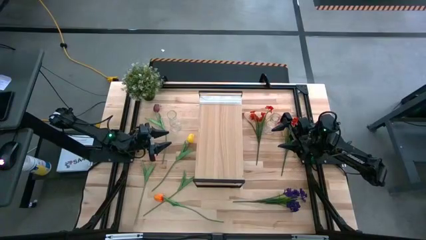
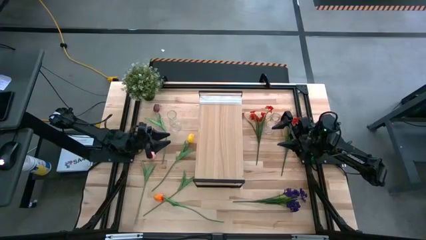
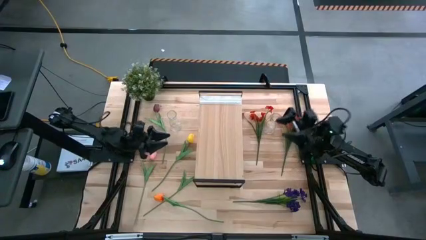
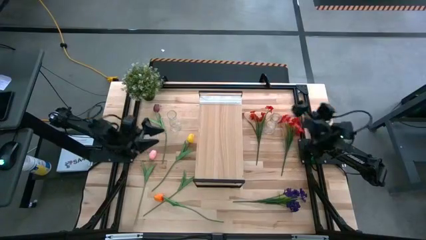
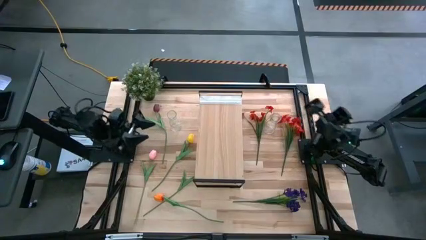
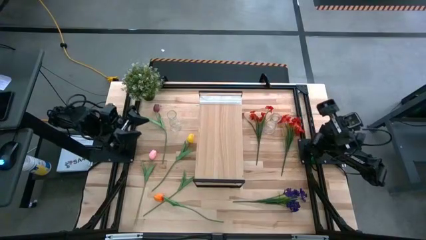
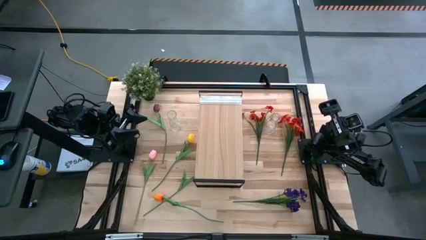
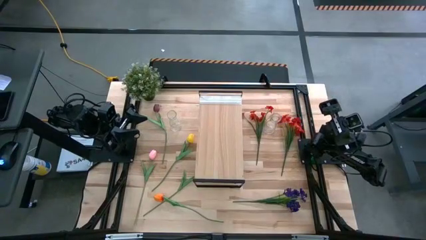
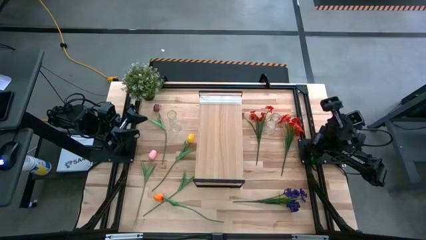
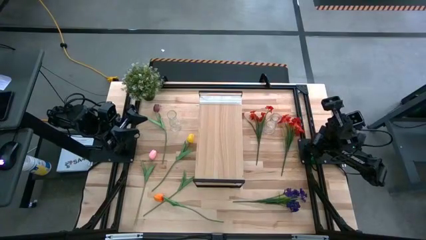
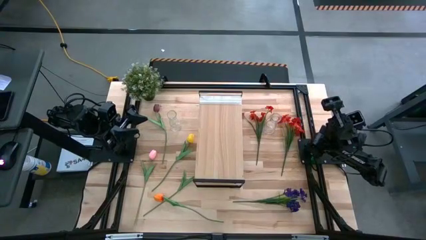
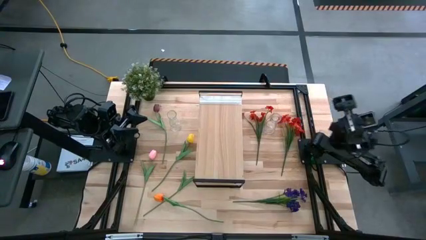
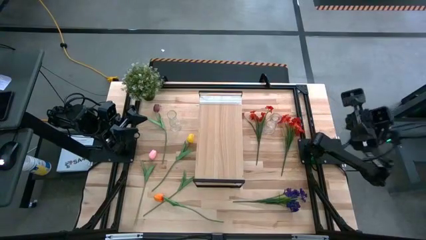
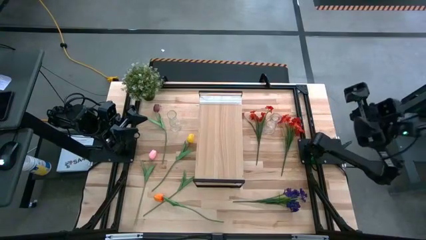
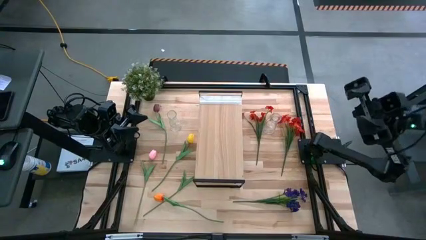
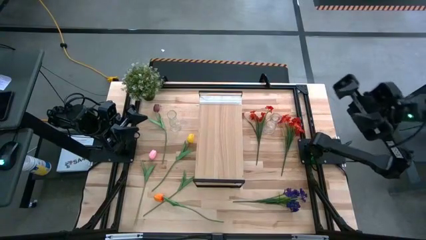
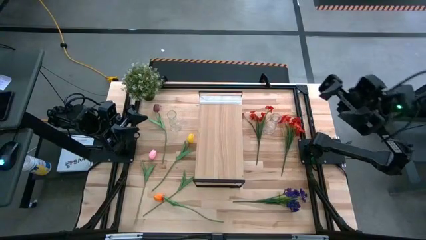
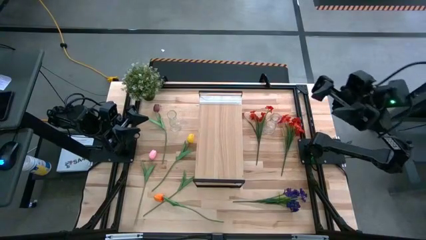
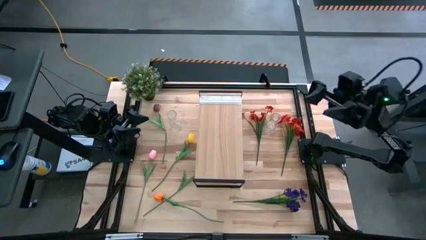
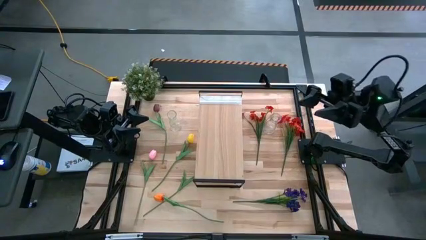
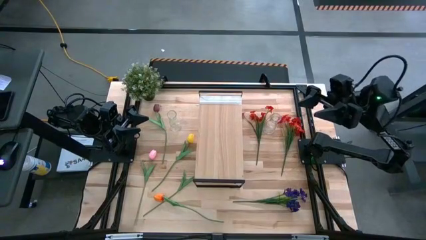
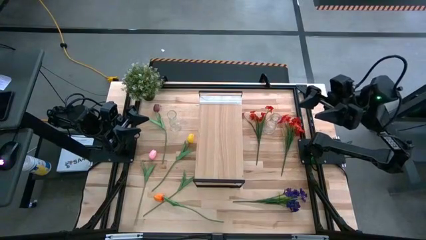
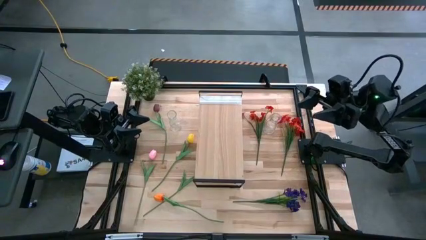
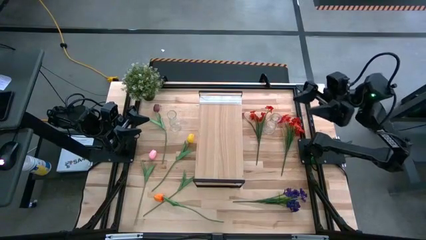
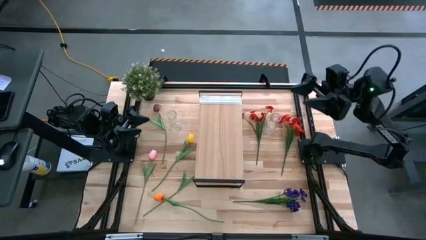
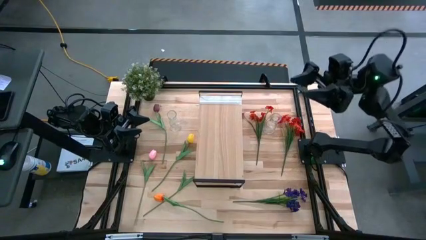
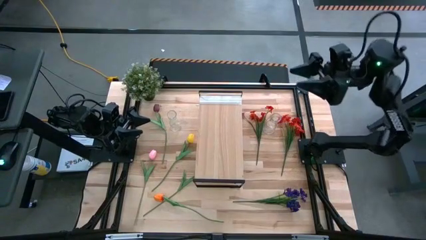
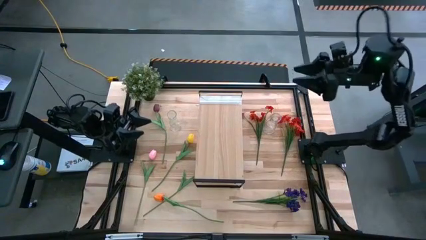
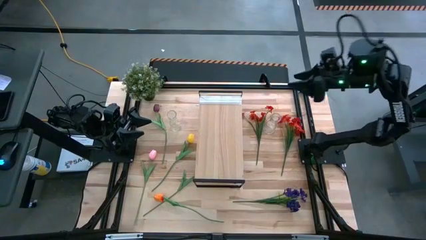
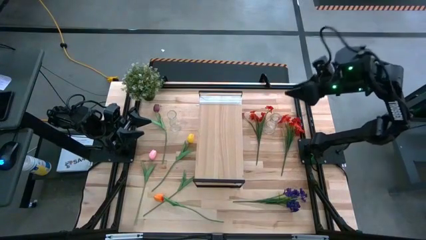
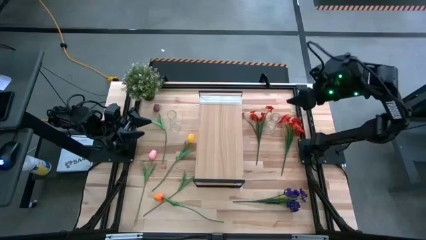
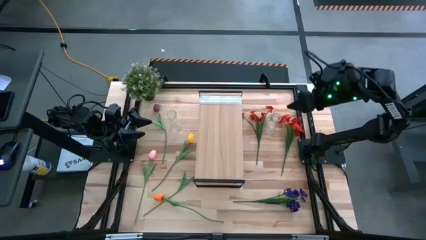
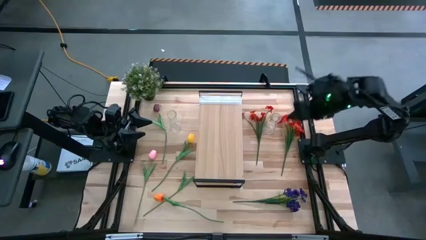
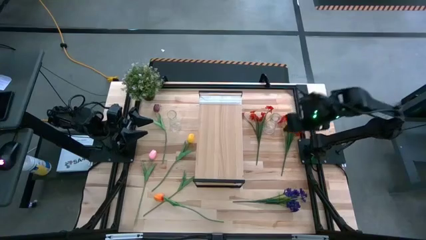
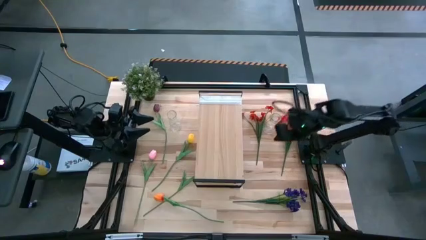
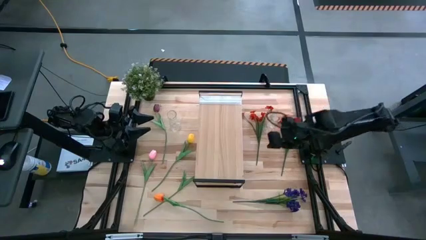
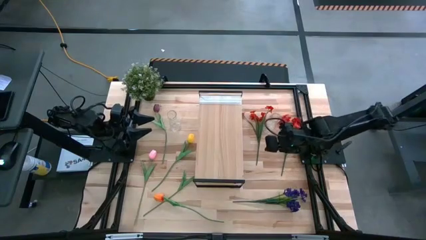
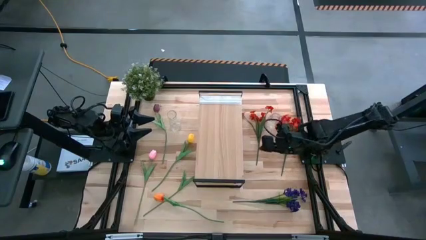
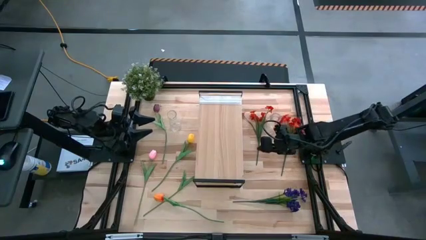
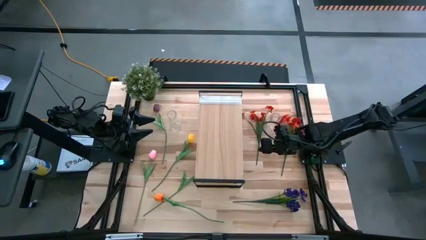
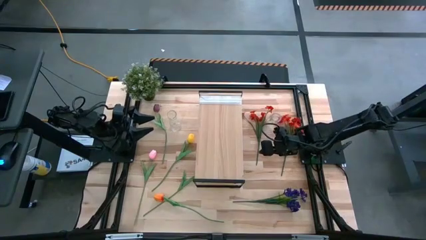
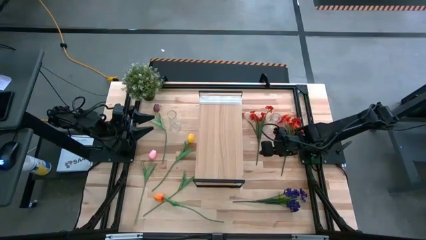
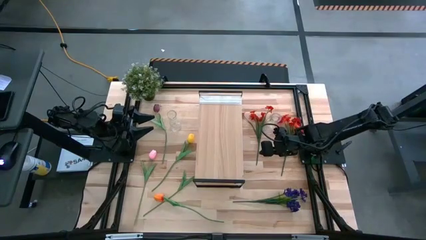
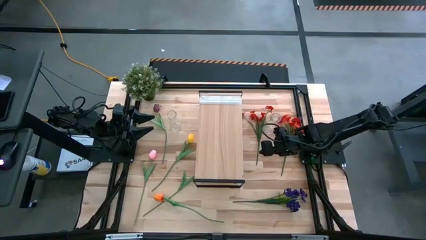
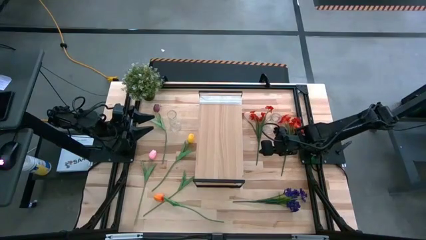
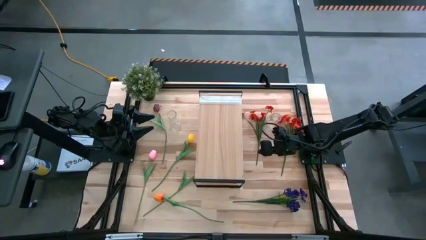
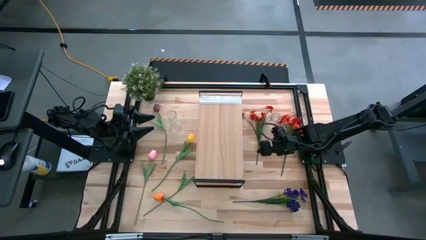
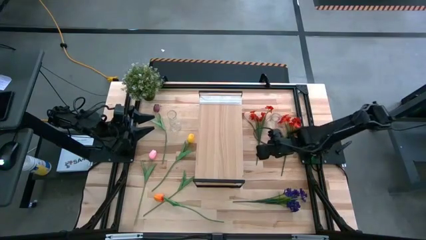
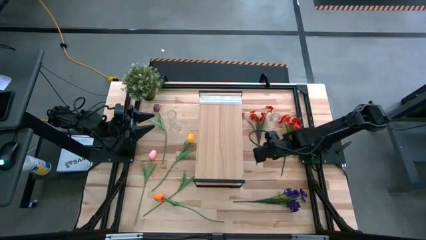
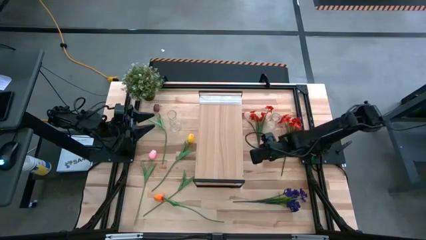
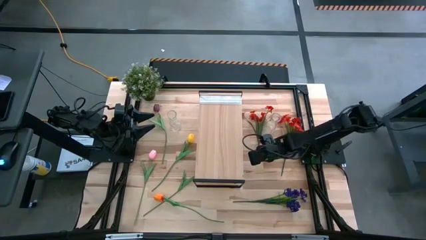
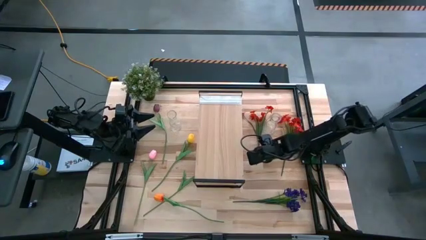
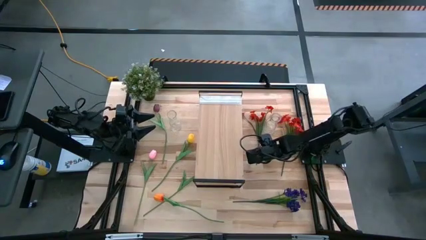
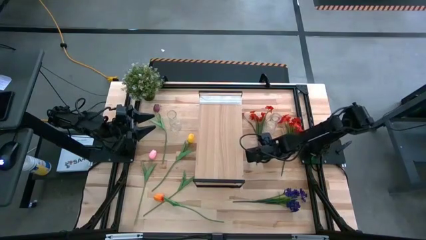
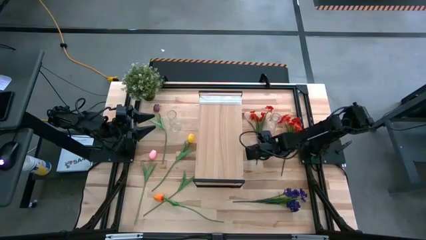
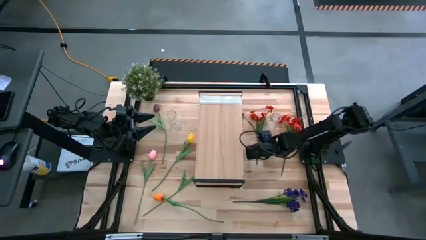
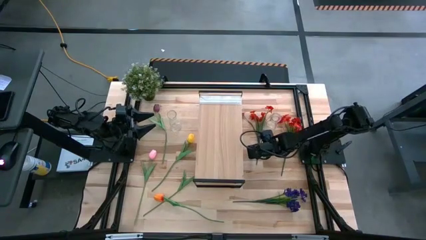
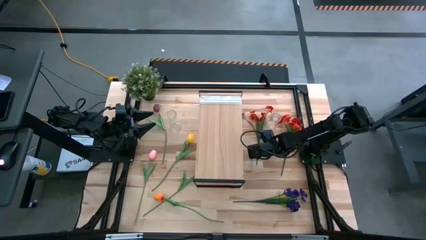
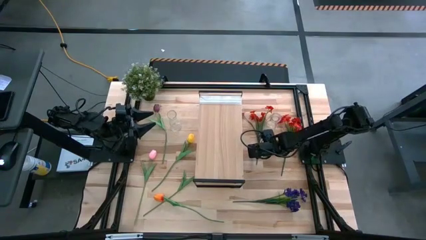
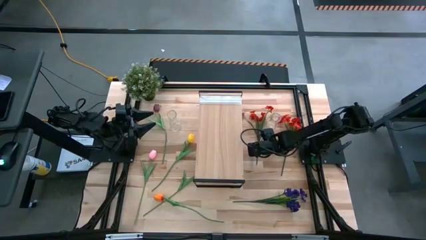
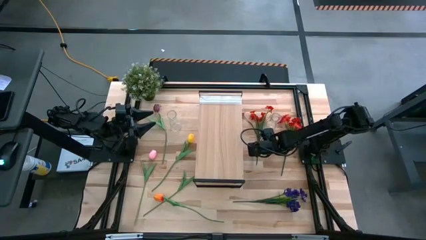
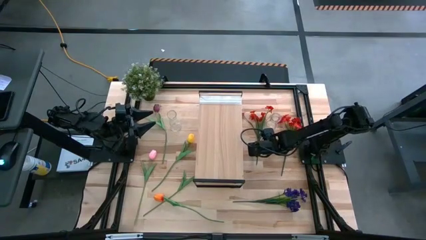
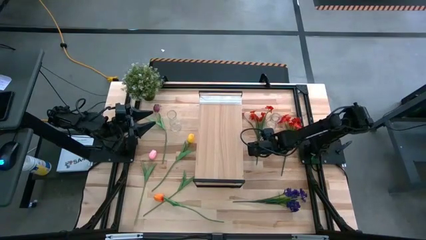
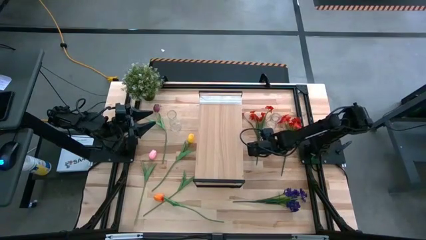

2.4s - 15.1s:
Task: Pick and place flowers into a vace then onto a shelf
Put the left red flowers into the right transparent vase
